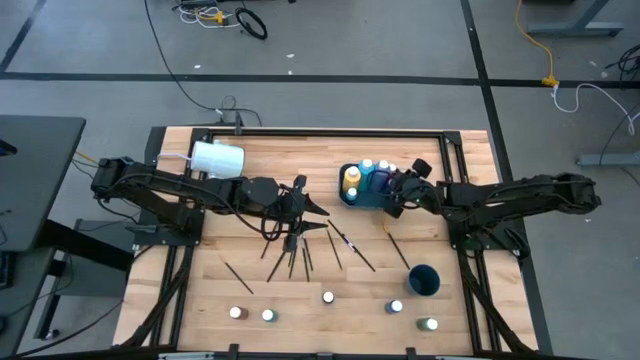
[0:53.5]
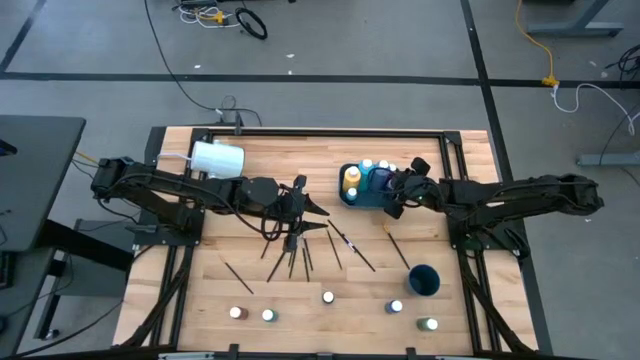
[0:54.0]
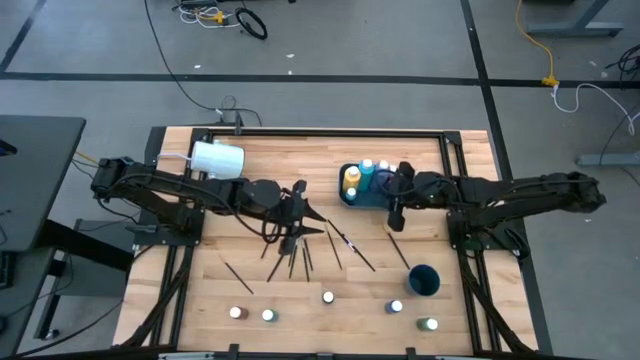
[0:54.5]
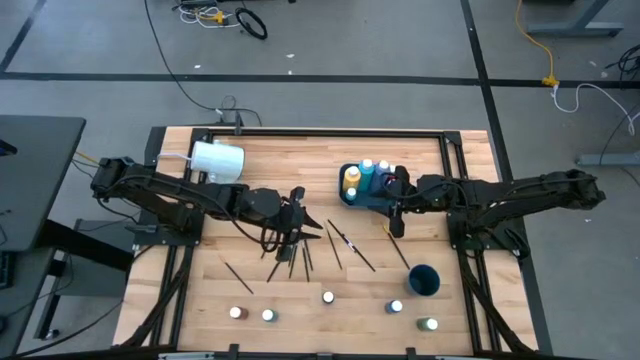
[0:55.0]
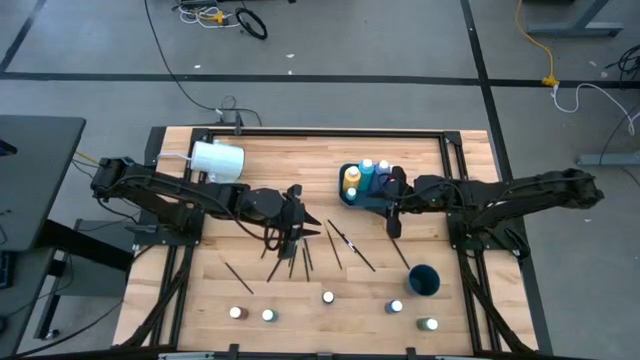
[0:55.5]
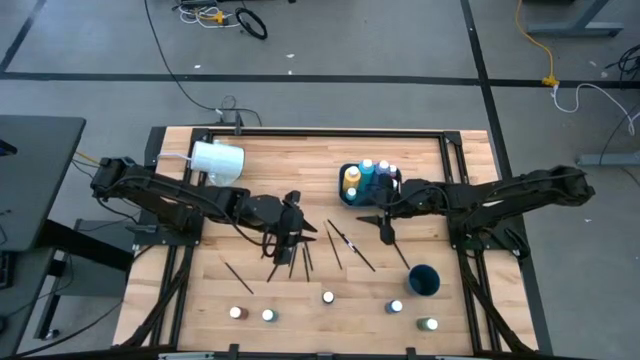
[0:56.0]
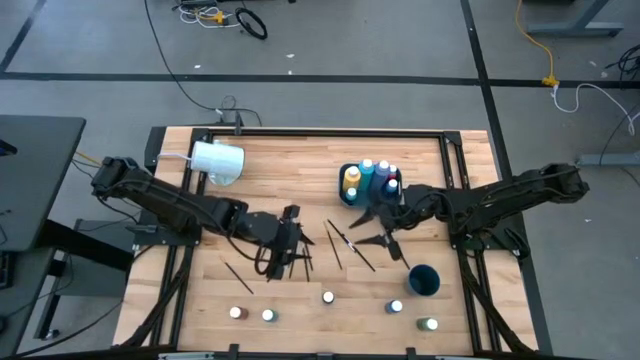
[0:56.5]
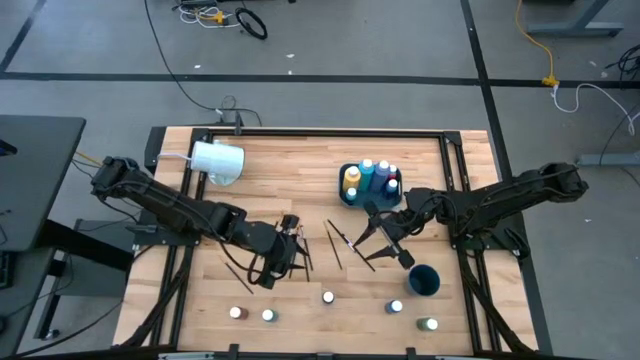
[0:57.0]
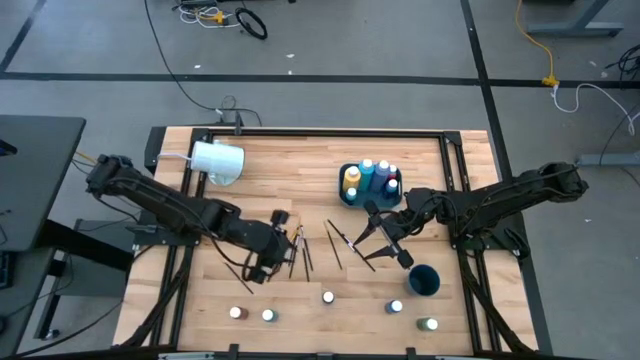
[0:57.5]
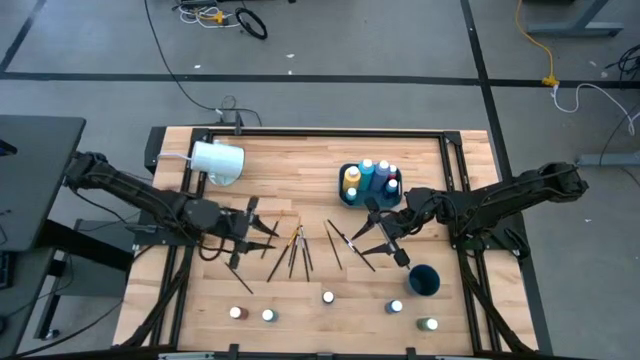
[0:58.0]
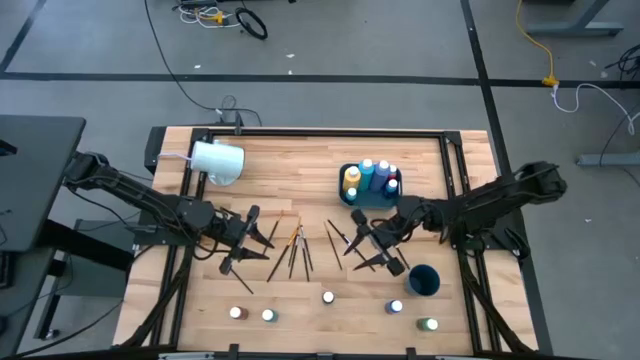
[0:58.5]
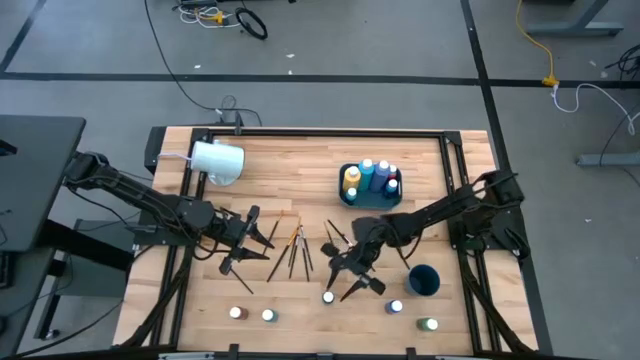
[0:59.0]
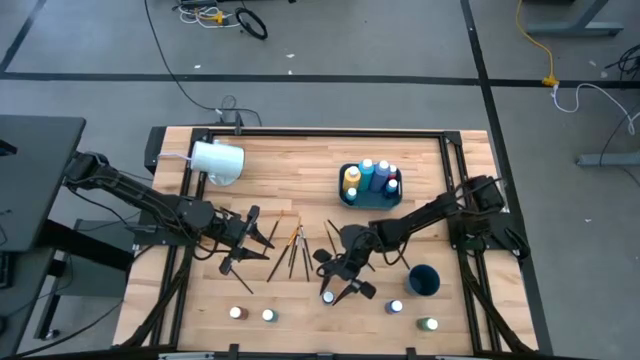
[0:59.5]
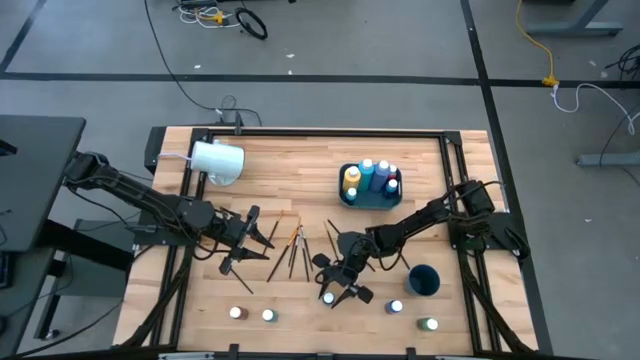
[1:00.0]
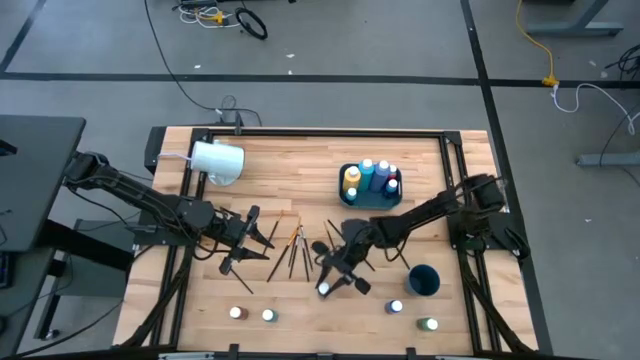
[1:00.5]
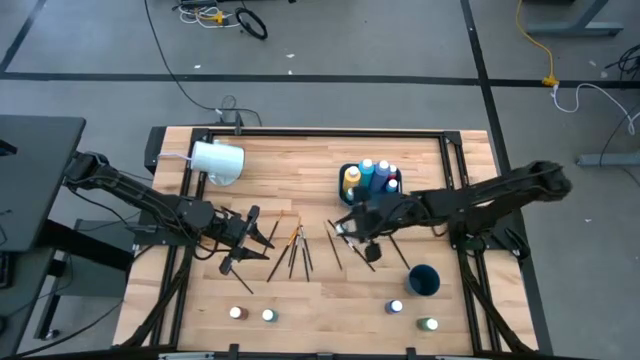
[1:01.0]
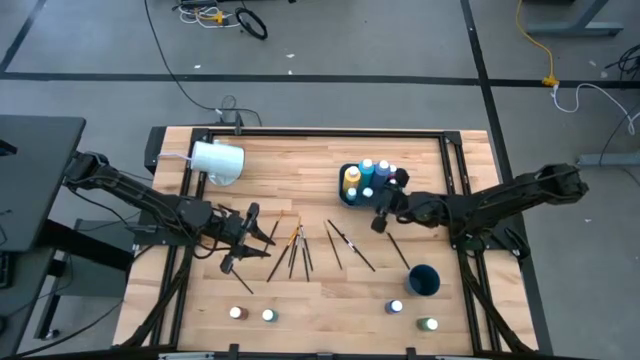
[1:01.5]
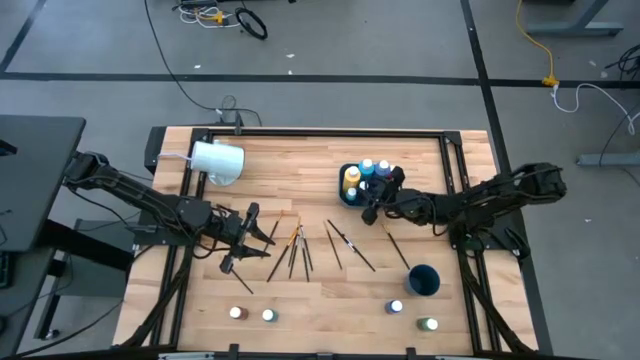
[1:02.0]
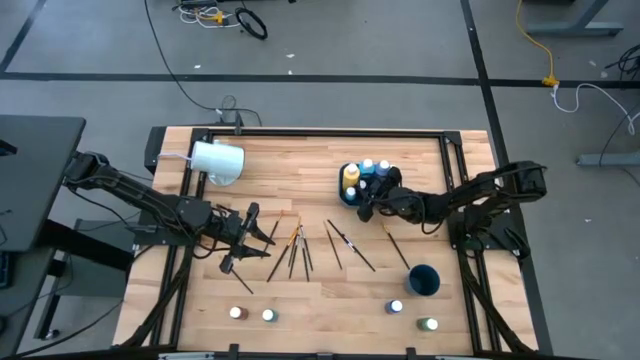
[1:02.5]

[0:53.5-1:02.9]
Task: Pick & Place Paint Supplies
Put the small black paint bottle into the bin

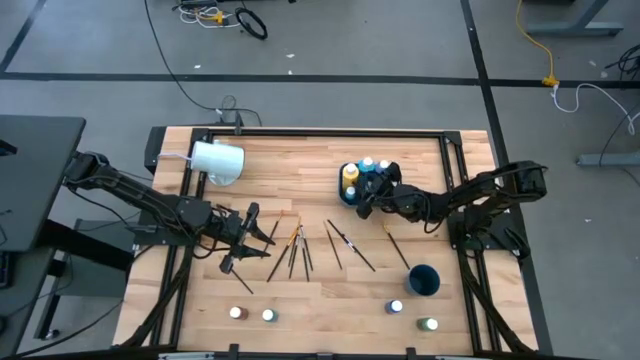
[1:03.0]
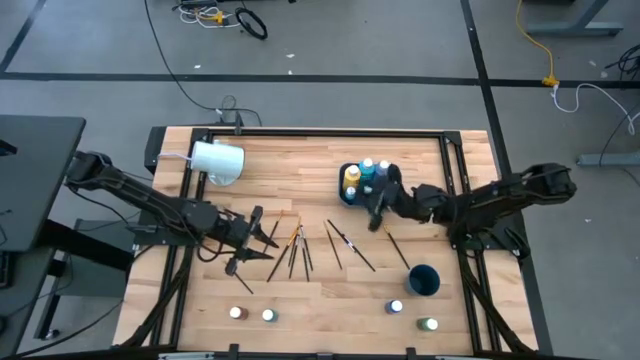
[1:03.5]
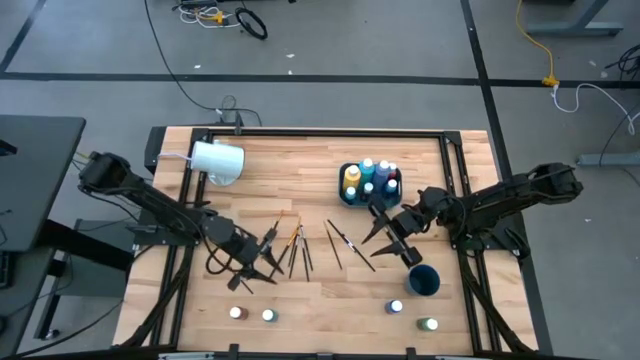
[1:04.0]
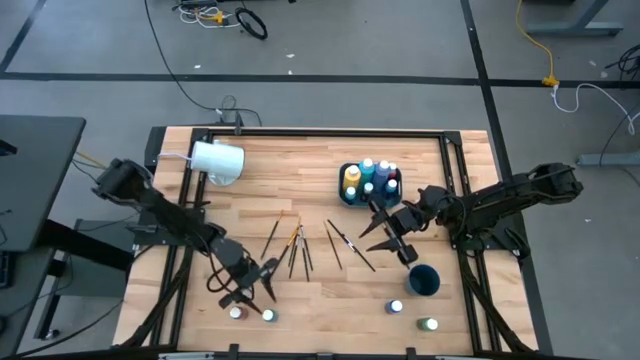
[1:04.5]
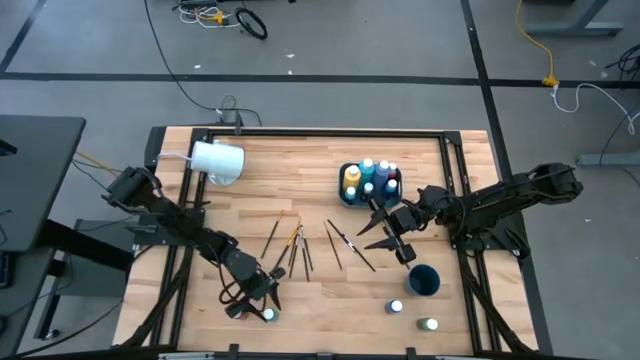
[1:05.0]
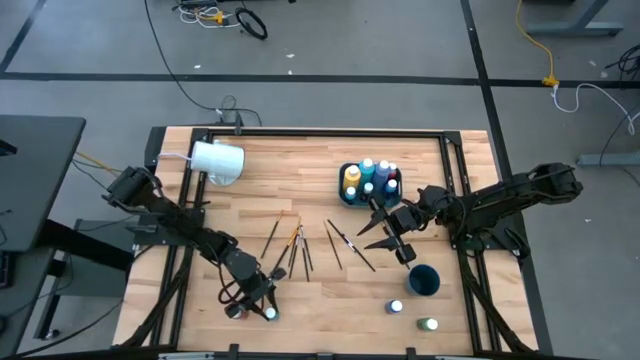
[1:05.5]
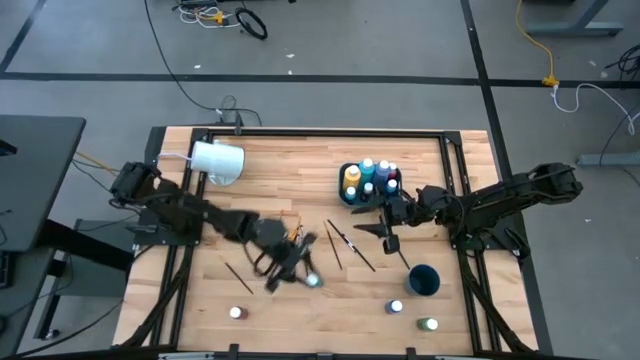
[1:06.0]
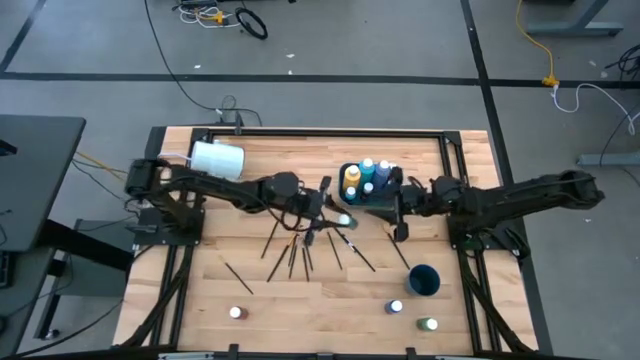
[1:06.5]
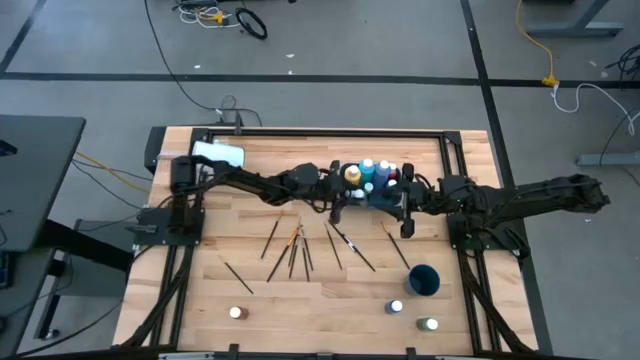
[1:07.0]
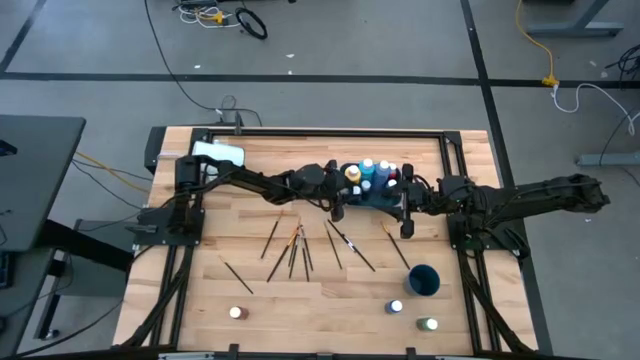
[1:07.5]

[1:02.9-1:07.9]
Put the small light green paint bottle into the bin

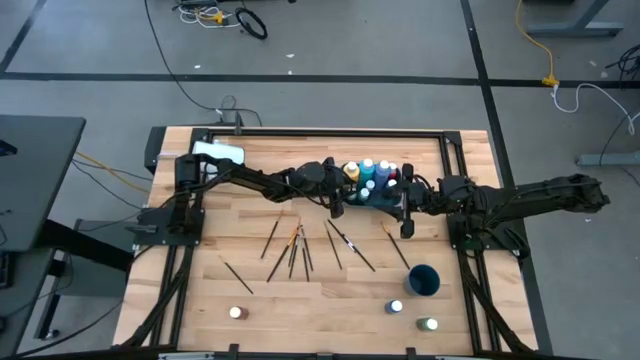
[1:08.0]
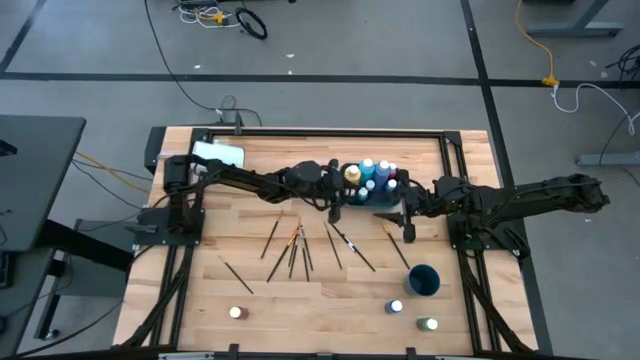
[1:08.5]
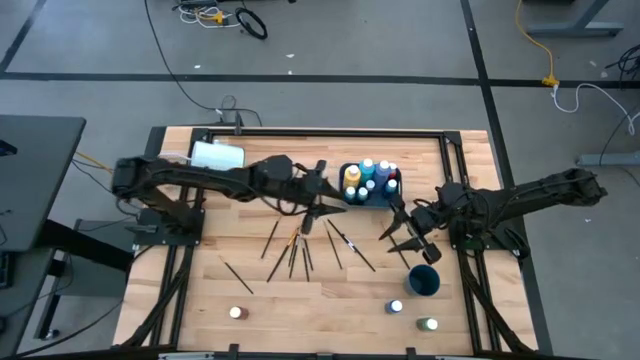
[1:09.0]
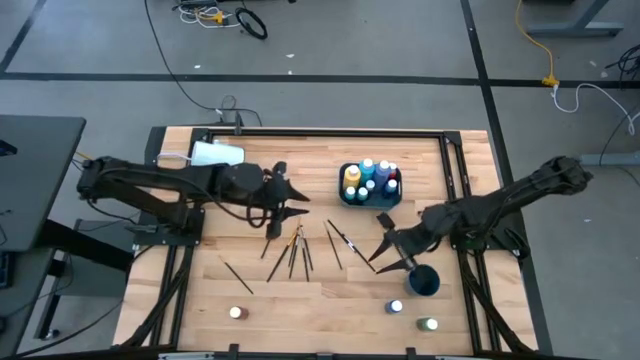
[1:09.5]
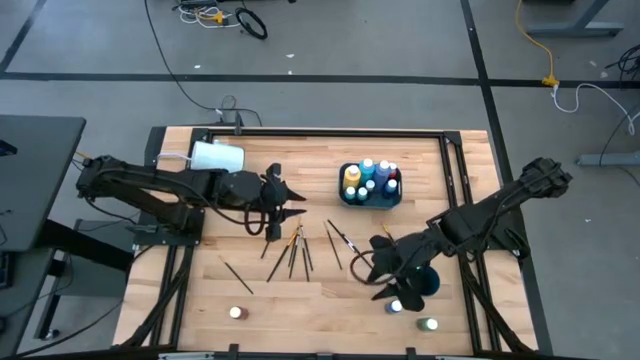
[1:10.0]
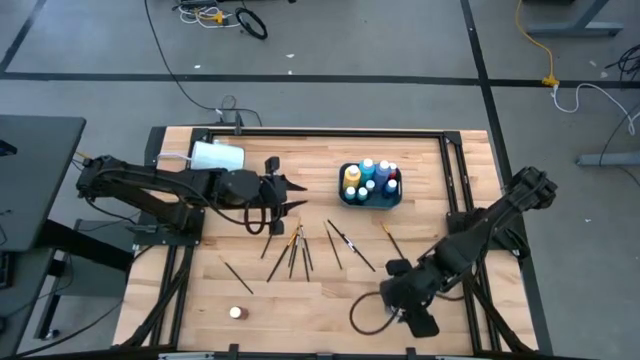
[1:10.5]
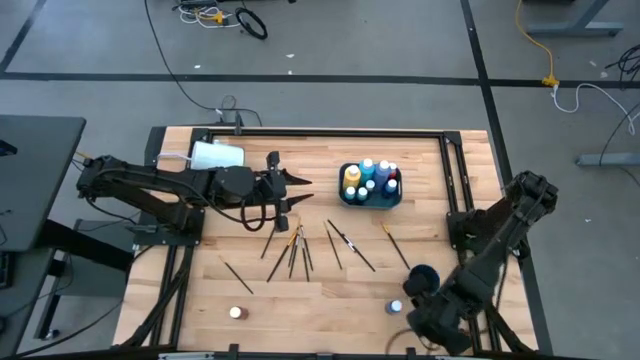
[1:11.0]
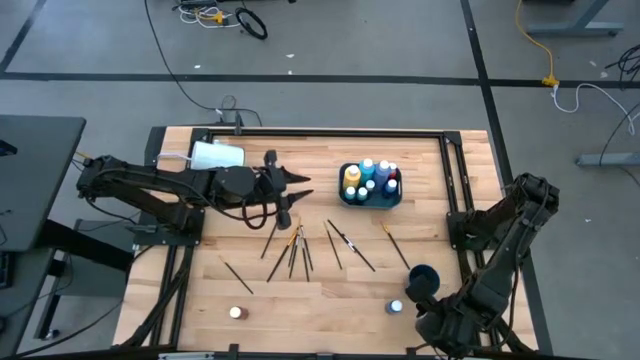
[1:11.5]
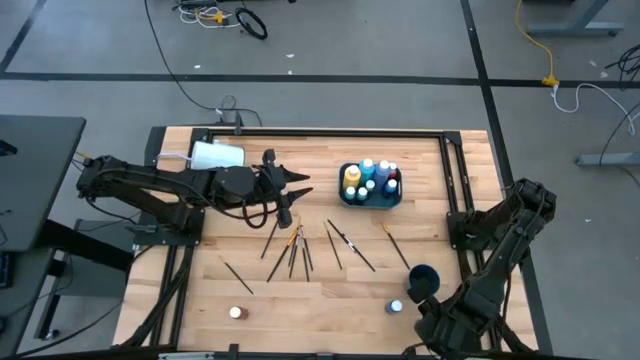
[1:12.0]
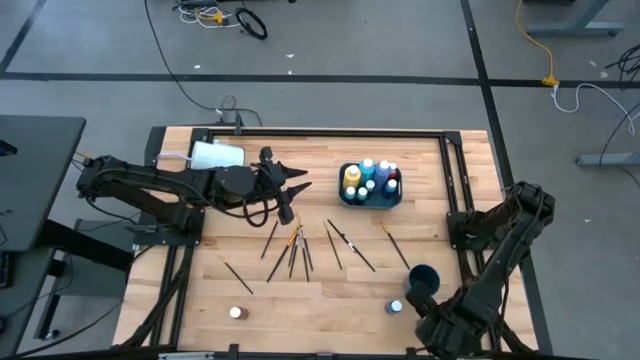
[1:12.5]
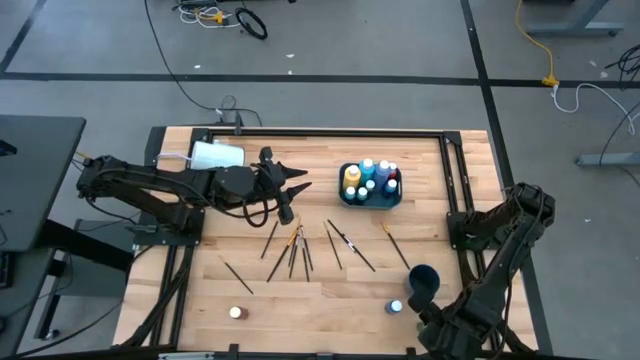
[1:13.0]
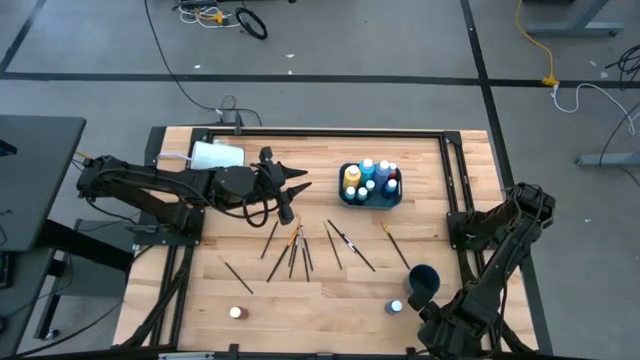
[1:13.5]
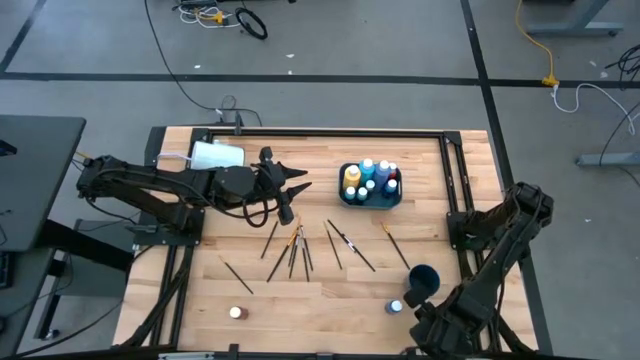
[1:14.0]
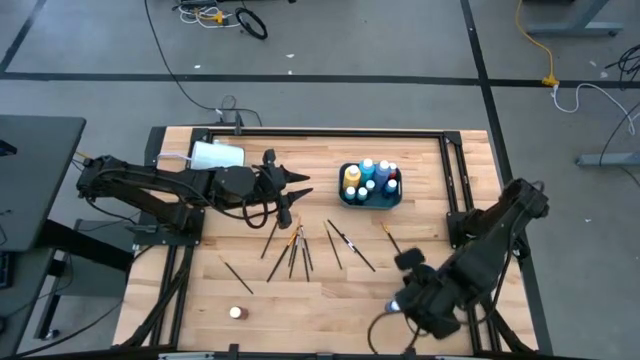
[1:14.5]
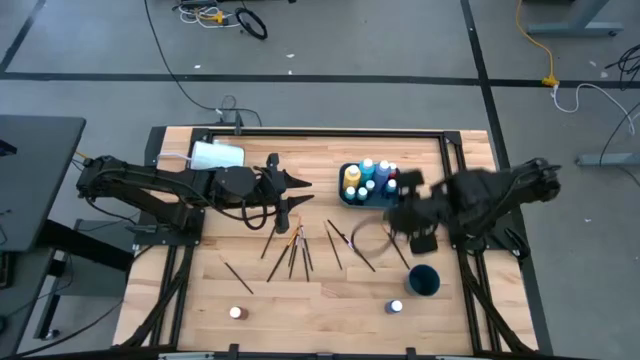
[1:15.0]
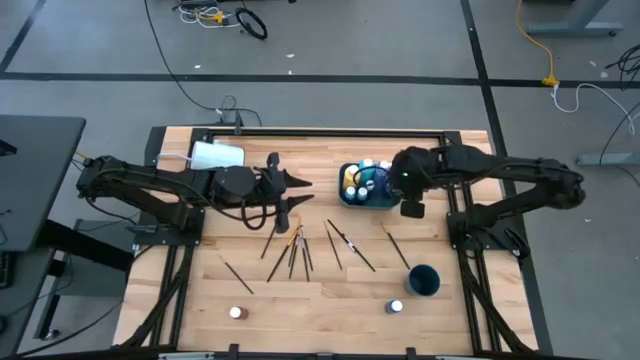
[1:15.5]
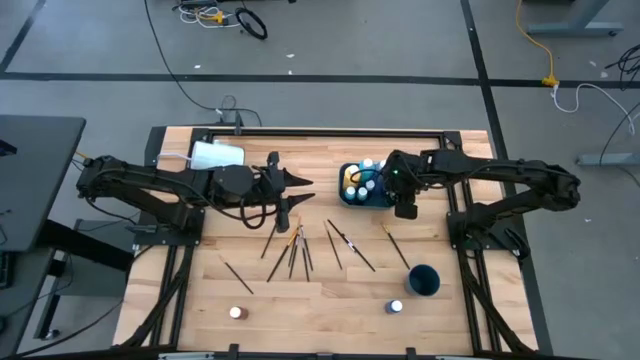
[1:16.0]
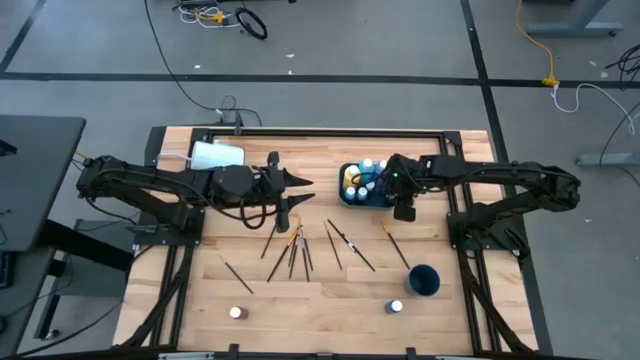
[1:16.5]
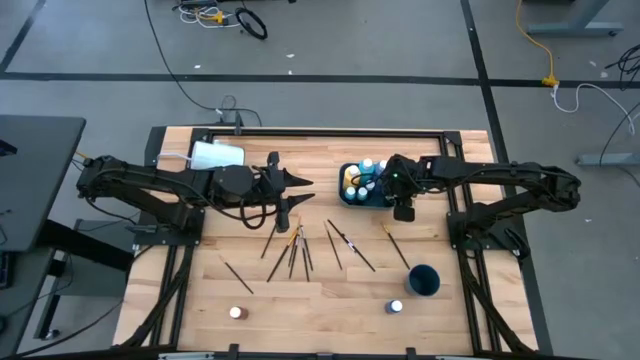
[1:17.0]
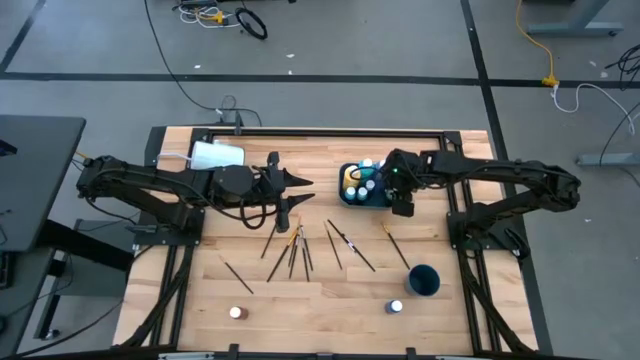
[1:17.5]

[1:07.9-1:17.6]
Put the small green paint bottle into the bin
